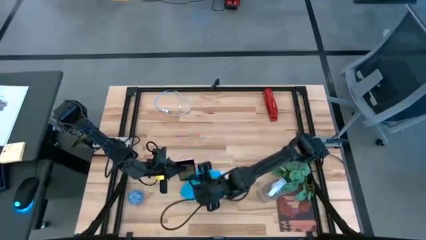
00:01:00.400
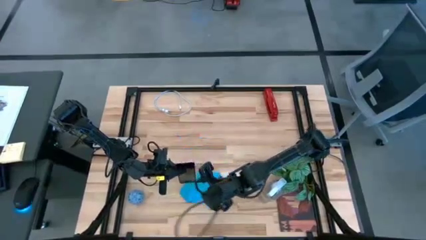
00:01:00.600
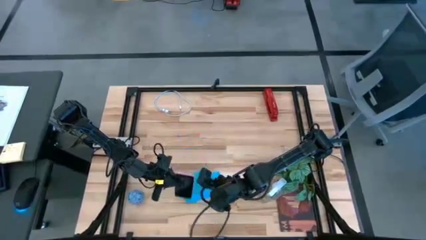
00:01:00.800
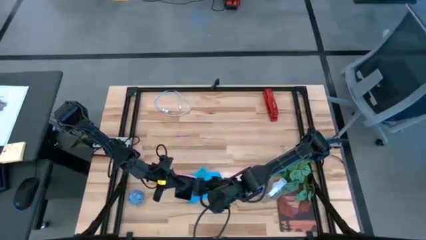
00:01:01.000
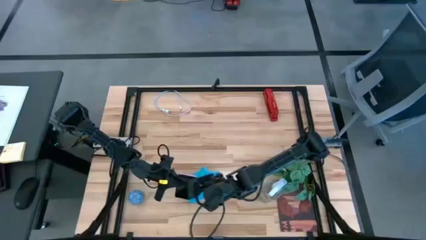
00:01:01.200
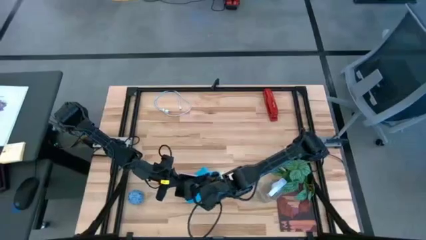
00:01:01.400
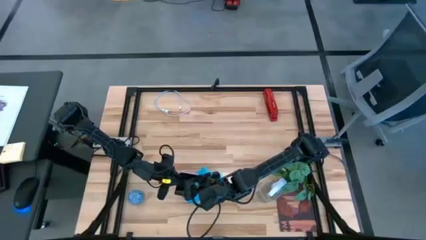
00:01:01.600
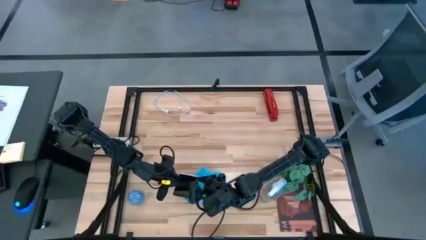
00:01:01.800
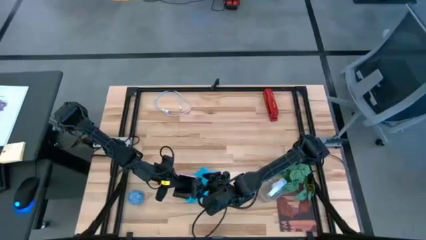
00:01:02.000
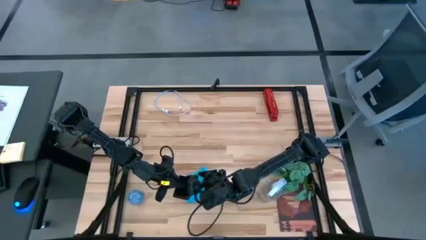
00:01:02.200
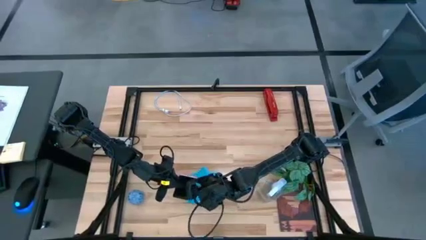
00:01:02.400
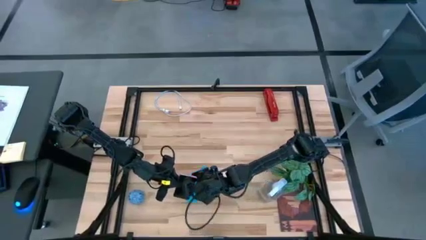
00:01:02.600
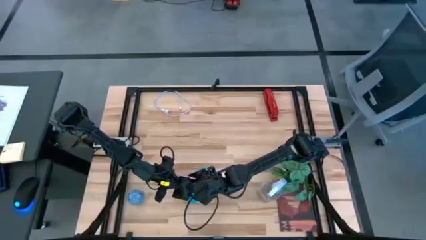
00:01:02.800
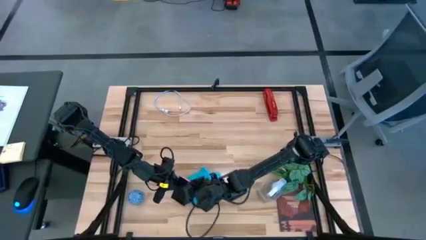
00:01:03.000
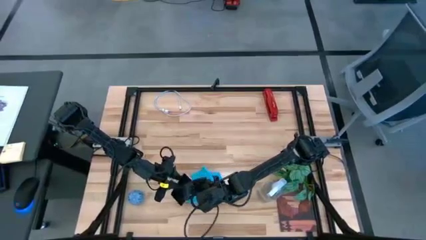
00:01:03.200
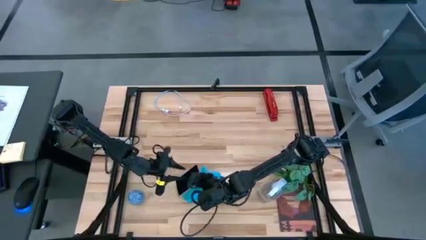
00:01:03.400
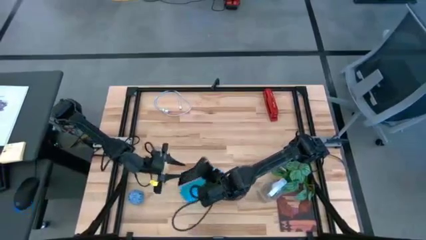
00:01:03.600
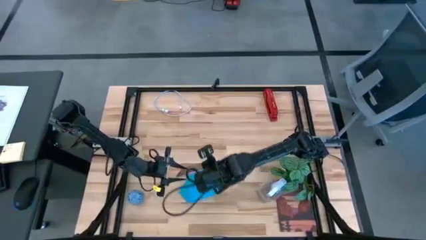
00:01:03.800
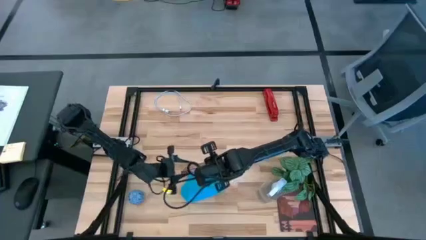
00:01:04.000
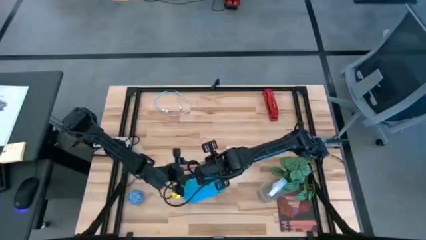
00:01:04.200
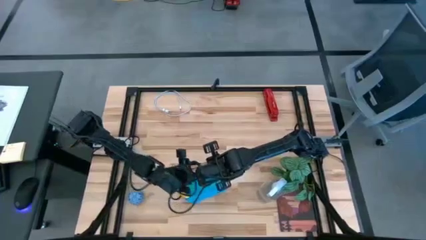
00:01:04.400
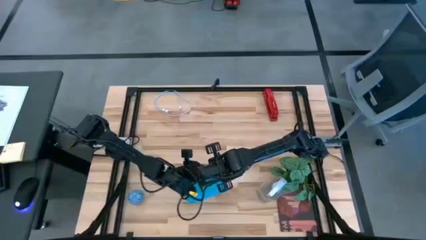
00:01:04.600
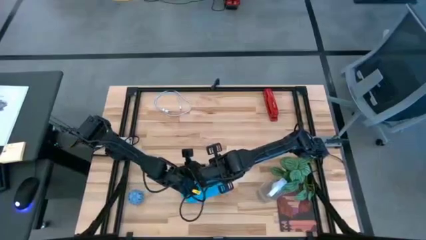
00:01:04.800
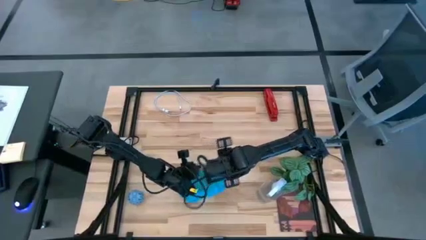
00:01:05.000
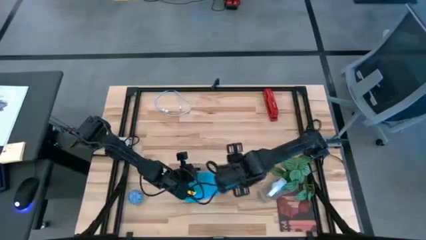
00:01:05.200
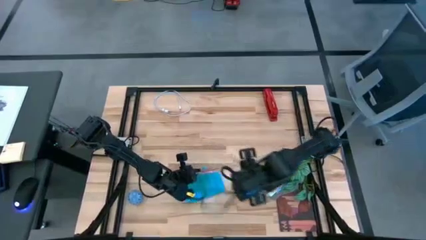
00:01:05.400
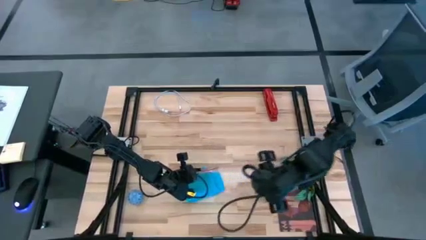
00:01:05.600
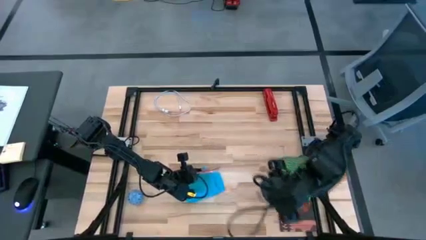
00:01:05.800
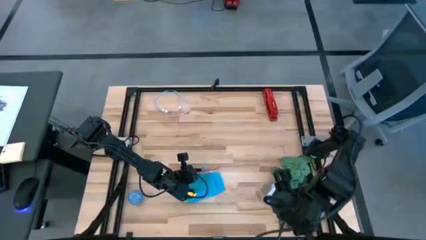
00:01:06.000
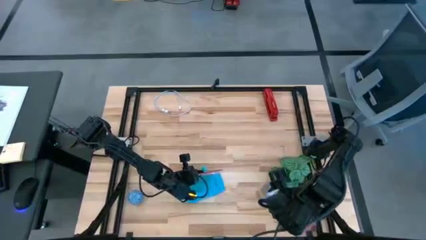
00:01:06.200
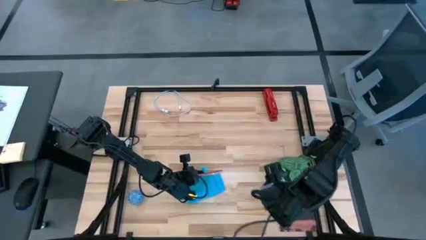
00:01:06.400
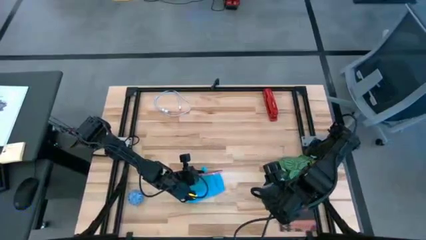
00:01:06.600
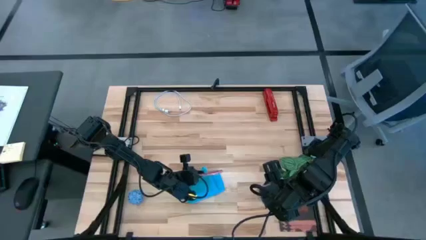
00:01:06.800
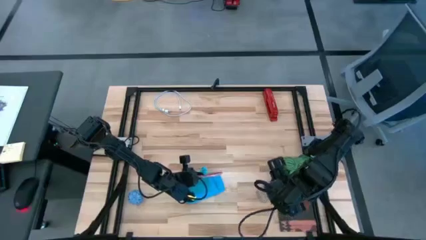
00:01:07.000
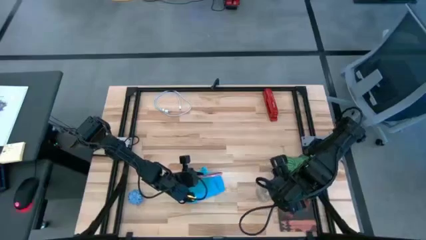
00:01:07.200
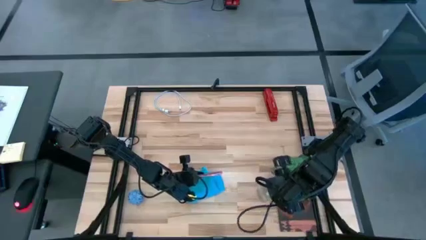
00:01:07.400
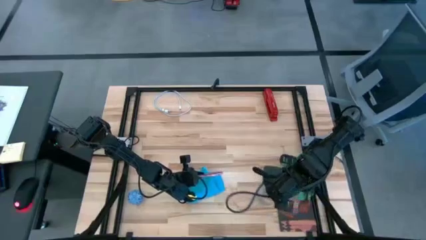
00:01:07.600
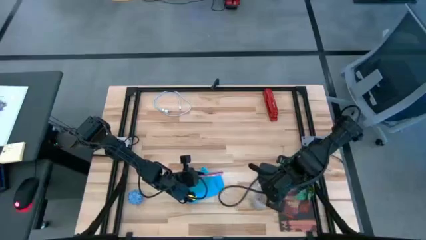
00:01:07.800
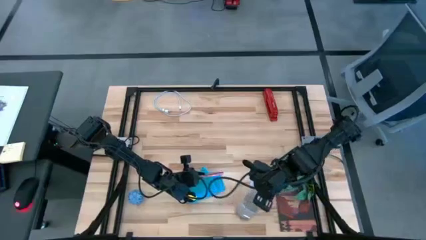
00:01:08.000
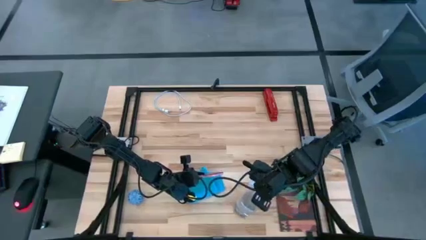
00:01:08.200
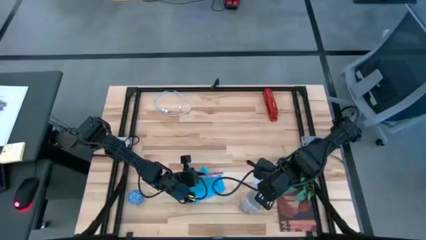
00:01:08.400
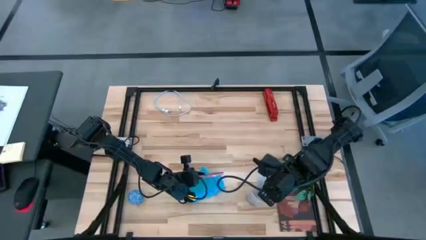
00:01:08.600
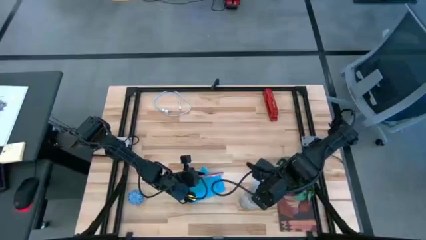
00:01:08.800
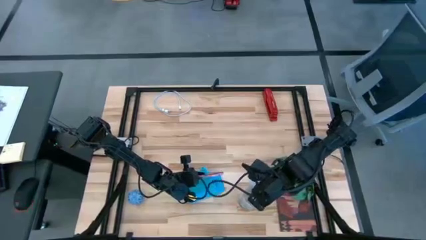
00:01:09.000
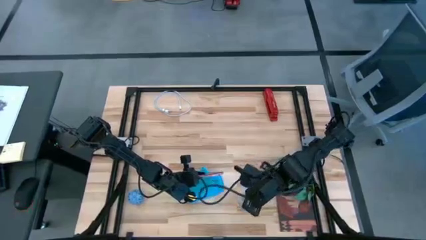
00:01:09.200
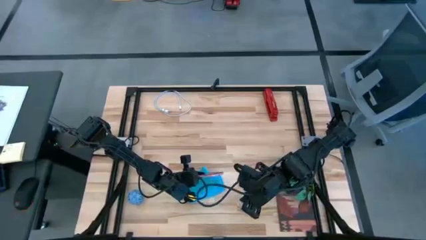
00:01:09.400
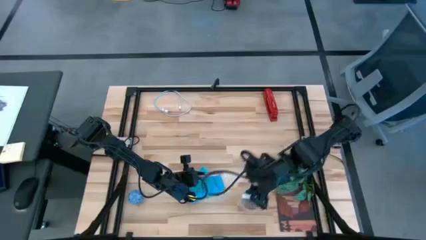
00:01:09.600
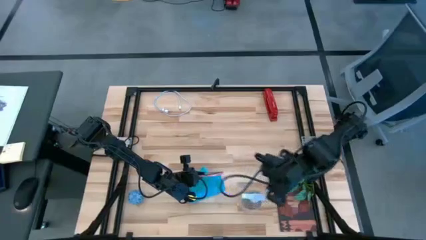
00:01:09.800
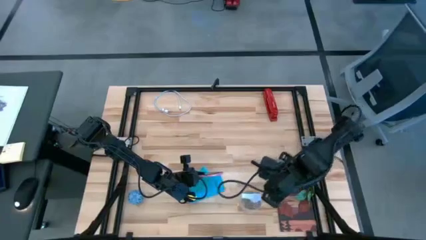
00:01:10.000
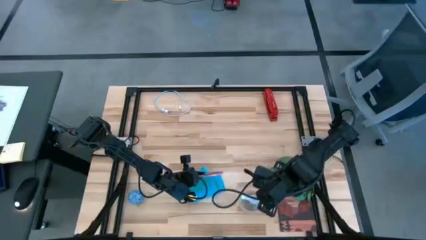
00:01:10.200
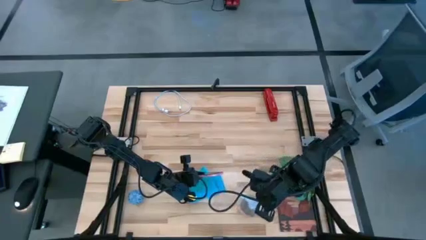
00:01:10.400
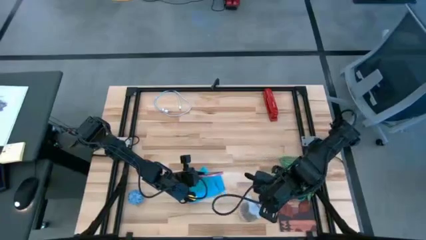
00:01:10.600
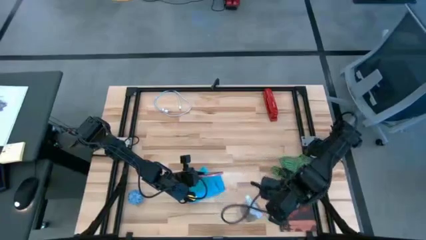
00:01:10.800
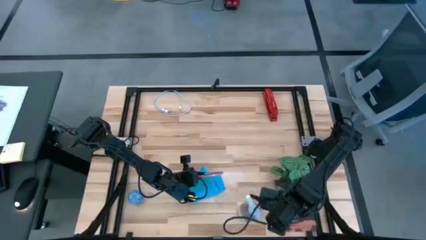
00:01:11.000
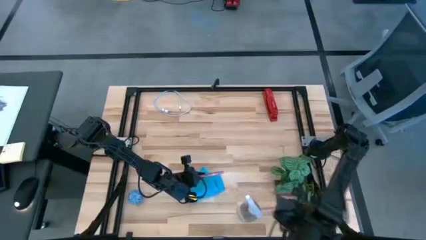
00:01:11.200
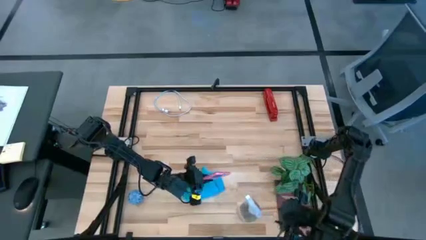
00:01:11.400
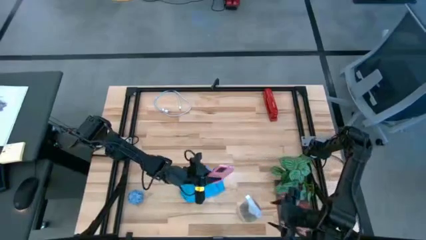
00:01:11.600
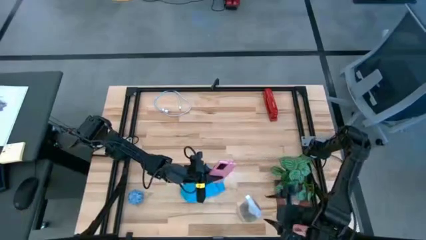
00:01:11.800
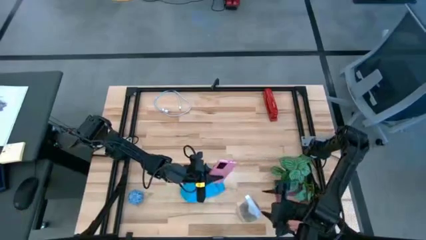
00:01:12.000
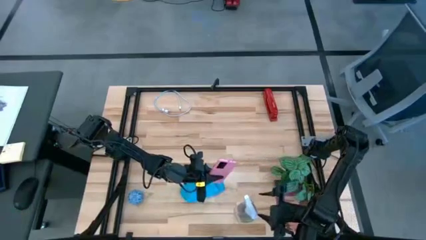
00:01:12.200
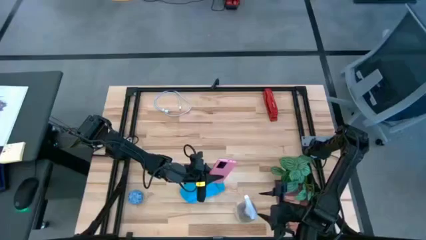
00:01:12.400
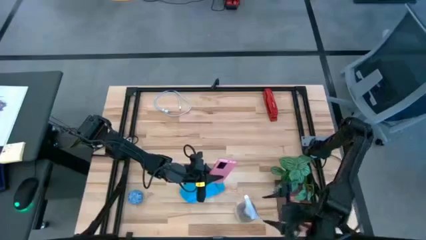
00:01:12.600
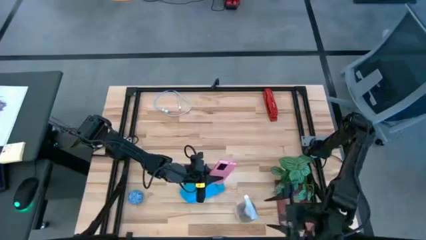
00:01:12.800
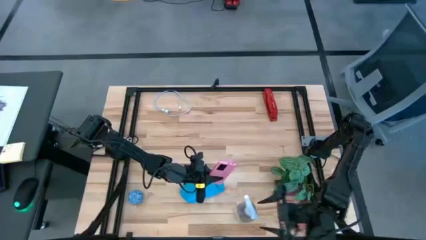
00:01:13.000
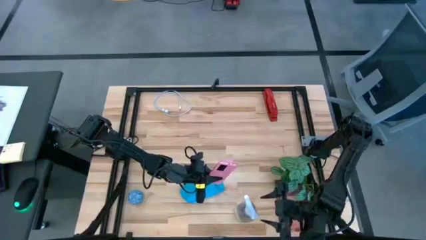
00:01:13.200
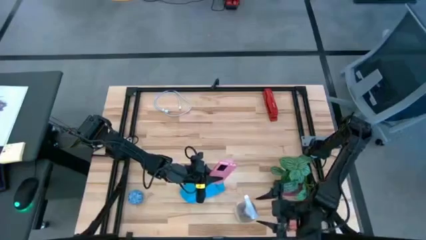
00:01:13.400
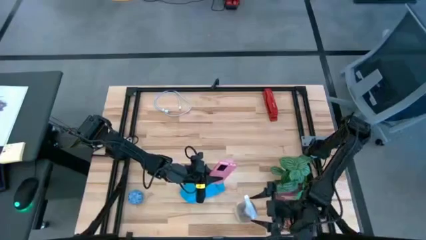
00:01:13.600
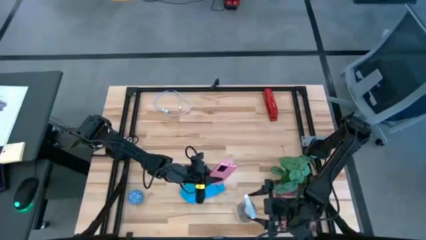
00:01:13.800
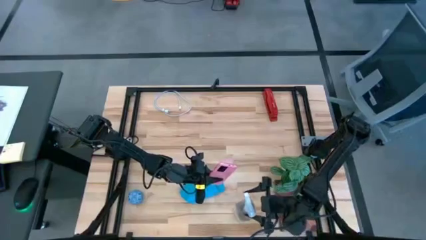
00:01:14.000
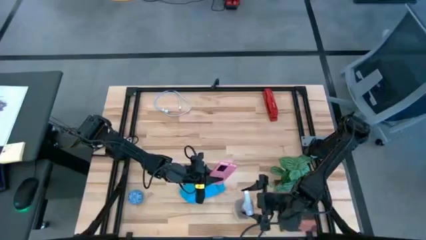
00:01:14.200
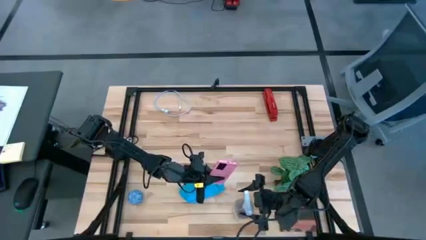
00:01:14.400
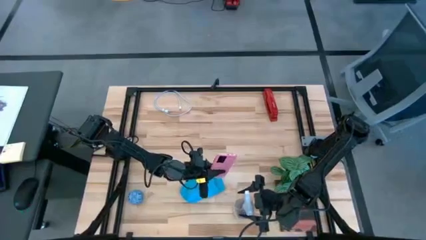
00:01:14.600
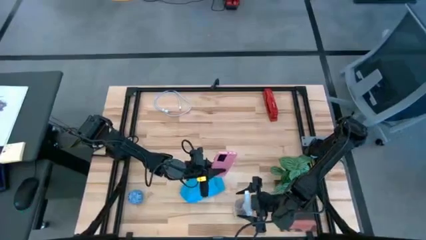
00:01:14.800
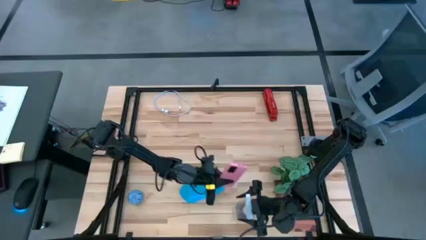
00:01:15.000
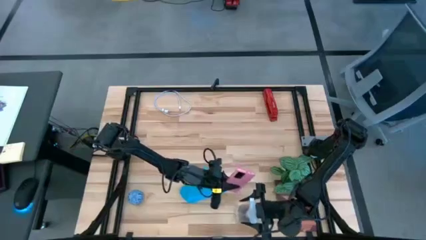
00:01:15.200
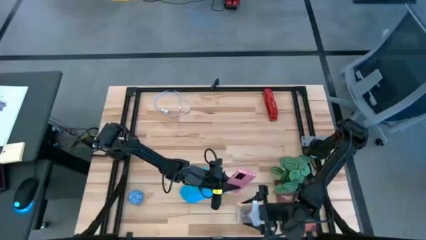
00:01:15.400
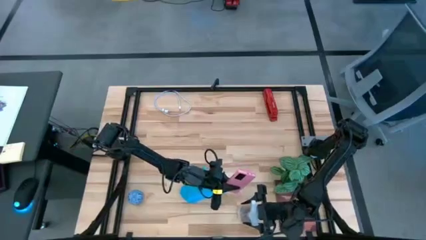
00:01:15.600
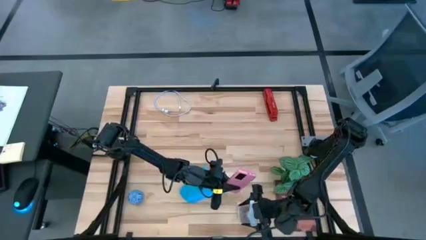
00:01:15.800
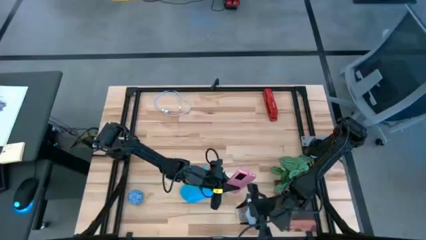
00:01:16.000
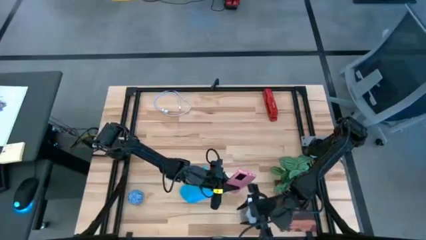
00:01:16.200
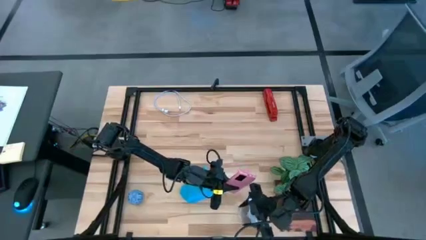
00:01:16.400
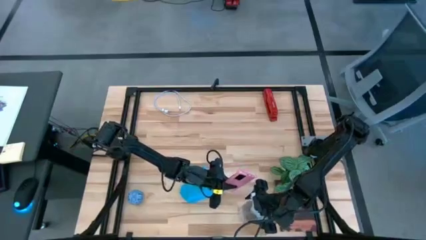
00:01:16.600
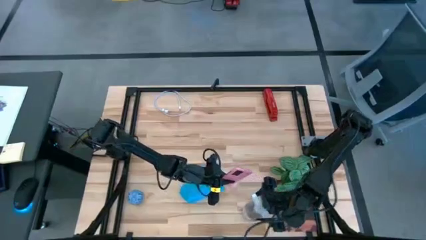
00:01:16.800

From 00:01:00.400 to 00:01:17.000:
Task: Apply microfiber cloth
Spray the back of the cellphone with the spray cleaning bottle
